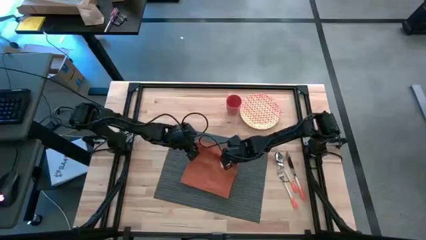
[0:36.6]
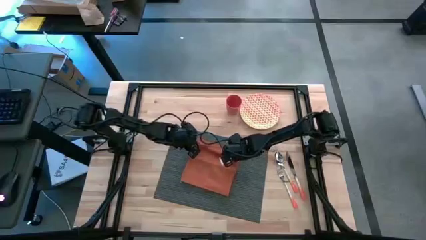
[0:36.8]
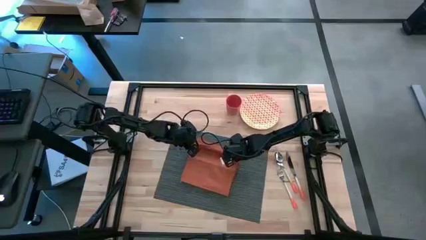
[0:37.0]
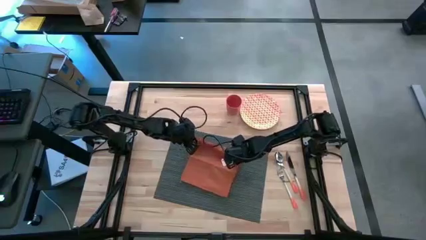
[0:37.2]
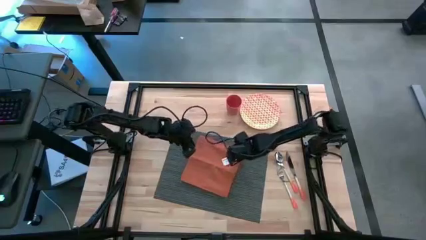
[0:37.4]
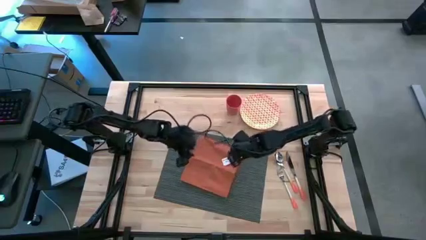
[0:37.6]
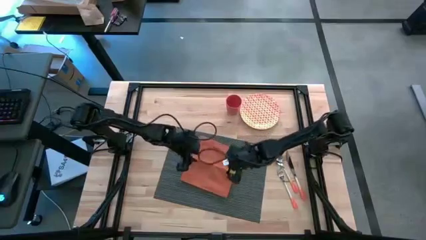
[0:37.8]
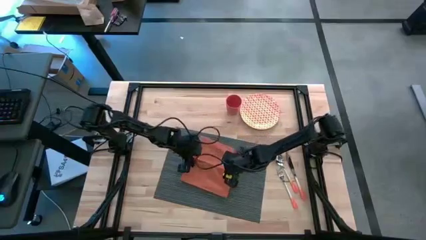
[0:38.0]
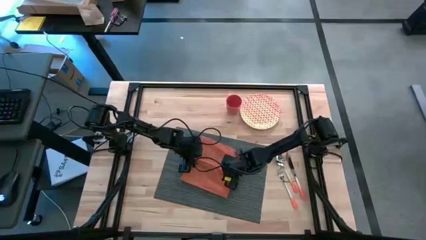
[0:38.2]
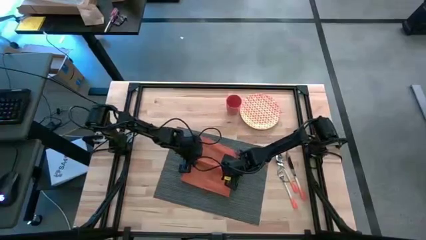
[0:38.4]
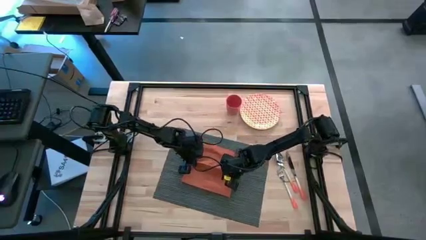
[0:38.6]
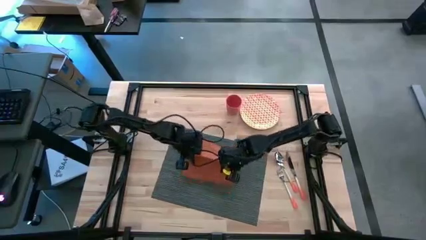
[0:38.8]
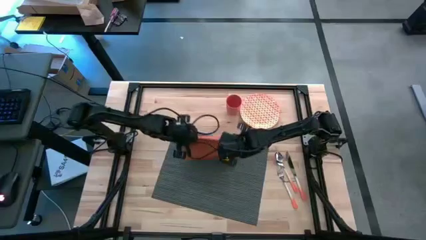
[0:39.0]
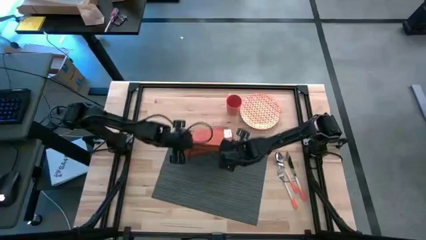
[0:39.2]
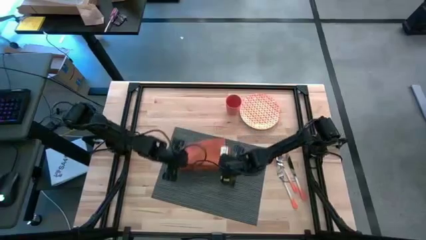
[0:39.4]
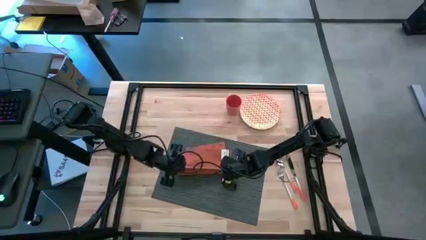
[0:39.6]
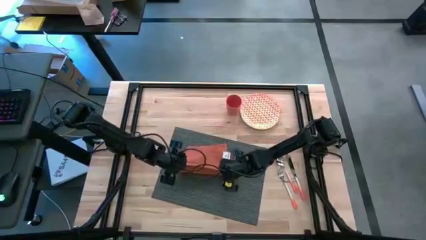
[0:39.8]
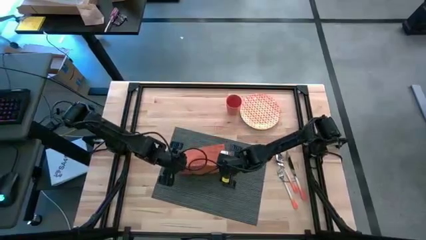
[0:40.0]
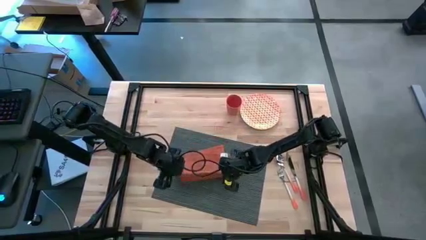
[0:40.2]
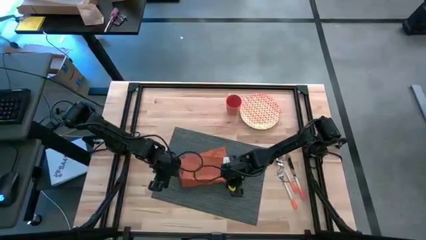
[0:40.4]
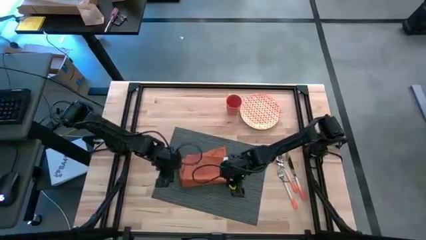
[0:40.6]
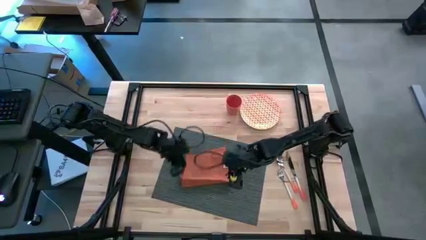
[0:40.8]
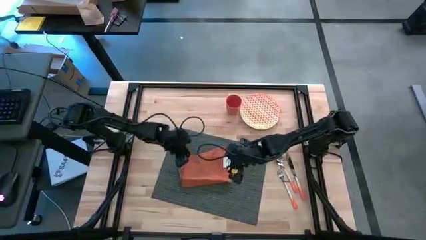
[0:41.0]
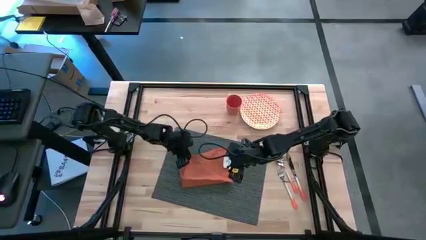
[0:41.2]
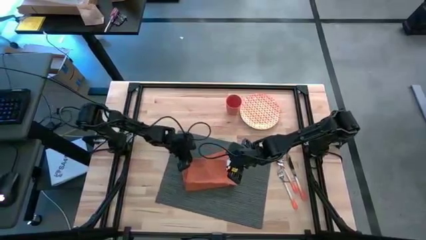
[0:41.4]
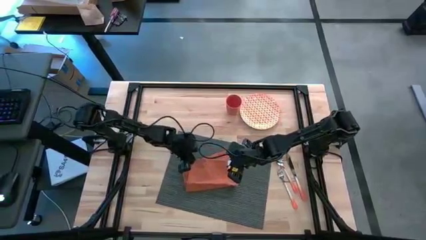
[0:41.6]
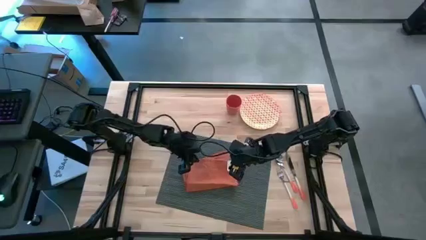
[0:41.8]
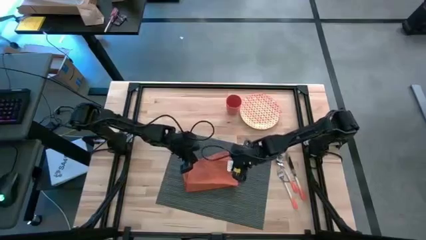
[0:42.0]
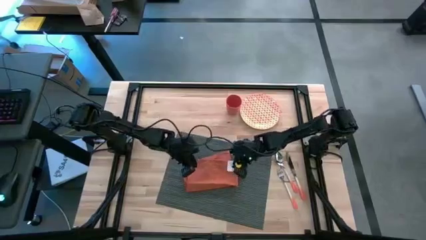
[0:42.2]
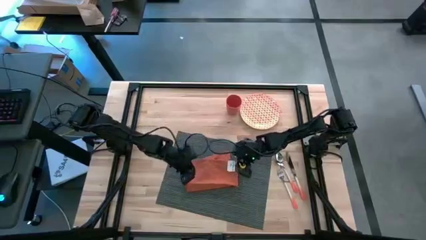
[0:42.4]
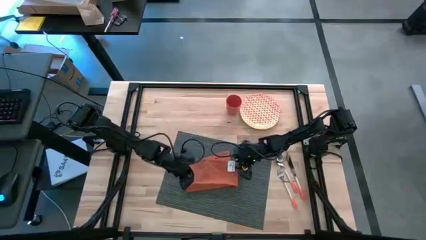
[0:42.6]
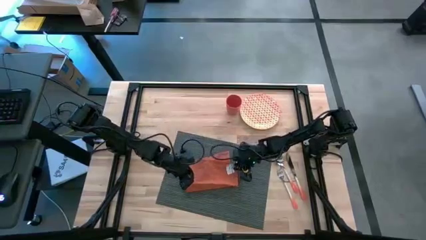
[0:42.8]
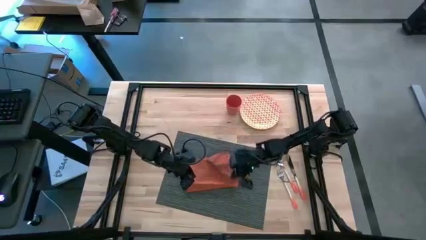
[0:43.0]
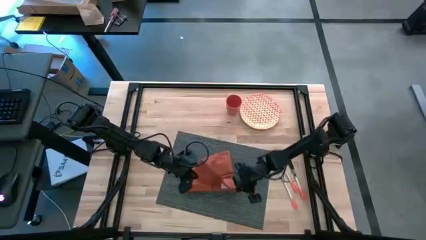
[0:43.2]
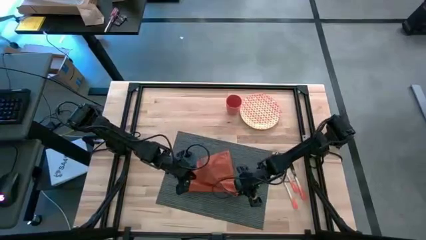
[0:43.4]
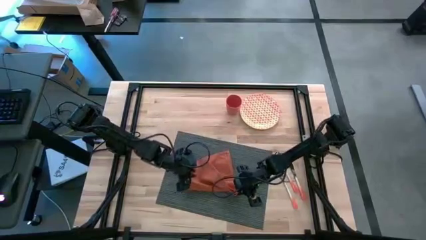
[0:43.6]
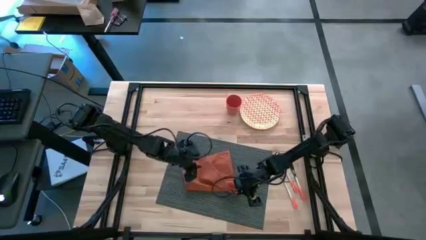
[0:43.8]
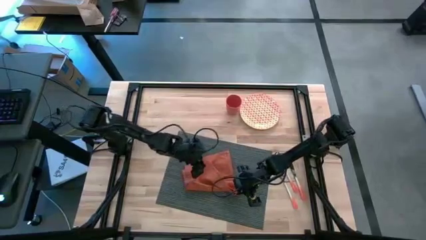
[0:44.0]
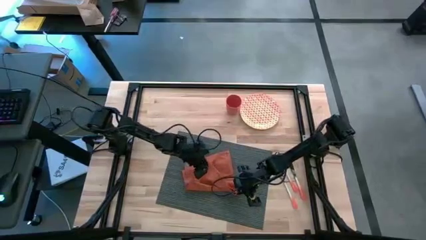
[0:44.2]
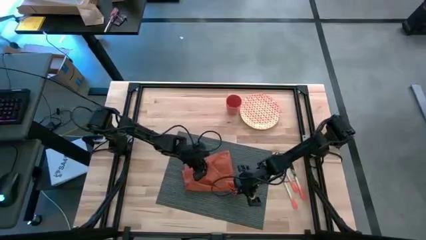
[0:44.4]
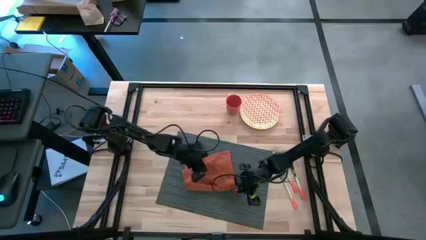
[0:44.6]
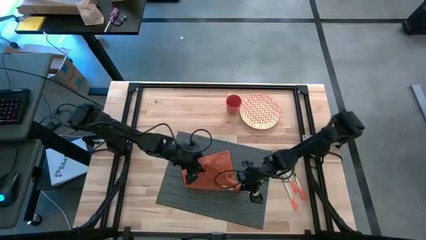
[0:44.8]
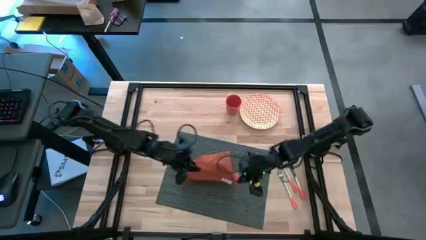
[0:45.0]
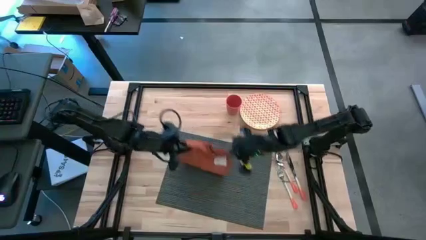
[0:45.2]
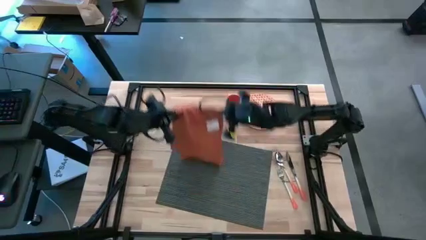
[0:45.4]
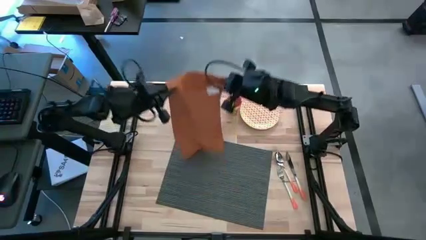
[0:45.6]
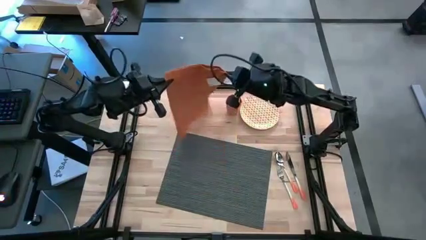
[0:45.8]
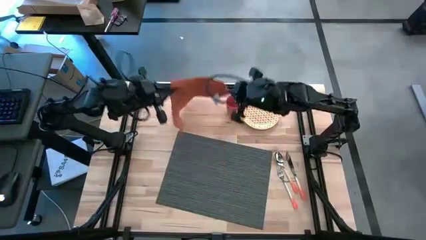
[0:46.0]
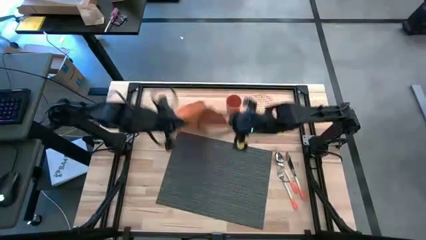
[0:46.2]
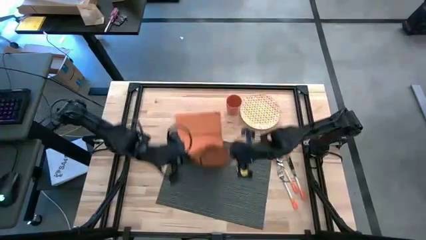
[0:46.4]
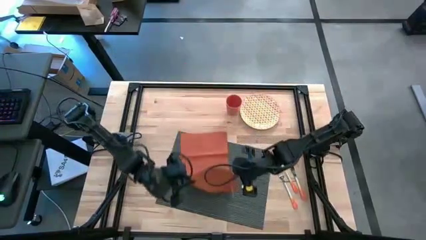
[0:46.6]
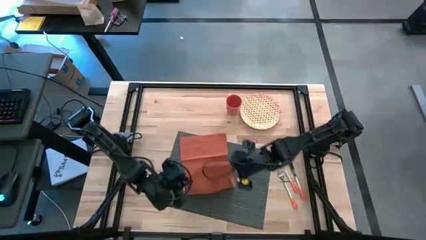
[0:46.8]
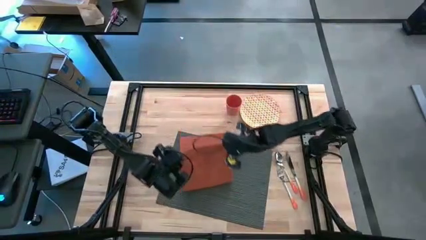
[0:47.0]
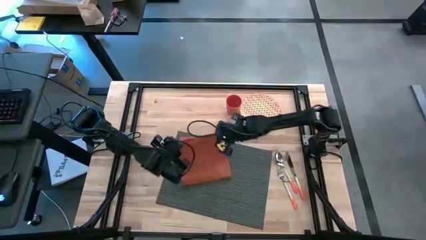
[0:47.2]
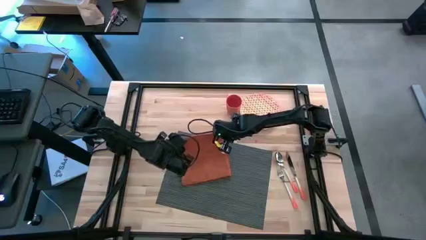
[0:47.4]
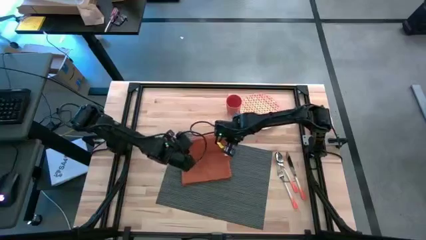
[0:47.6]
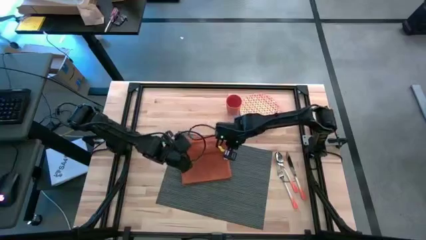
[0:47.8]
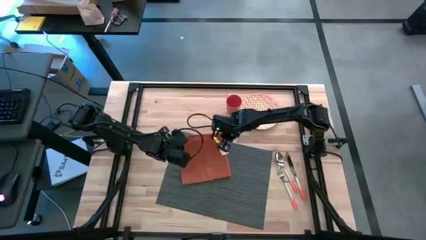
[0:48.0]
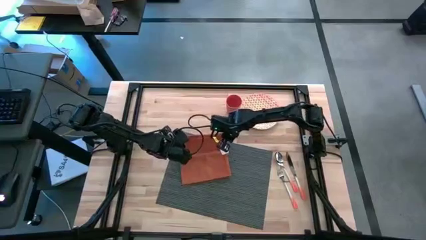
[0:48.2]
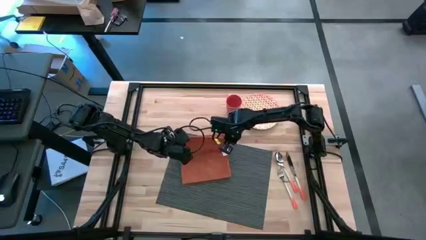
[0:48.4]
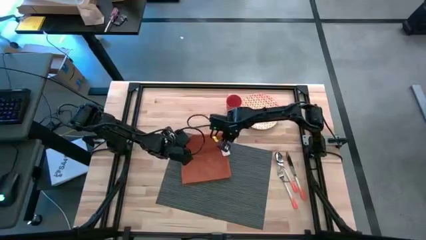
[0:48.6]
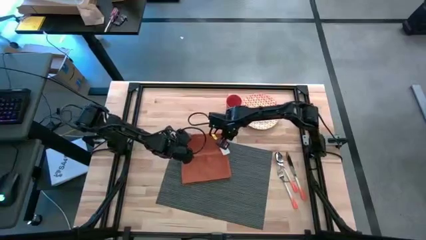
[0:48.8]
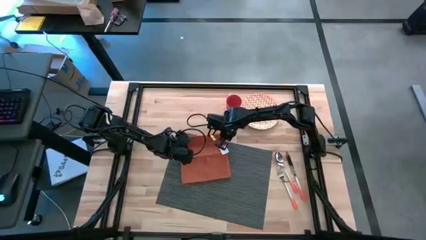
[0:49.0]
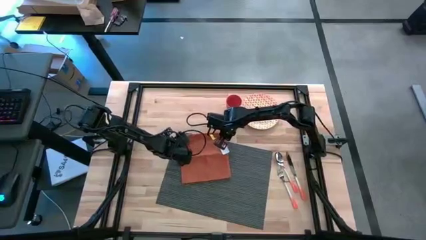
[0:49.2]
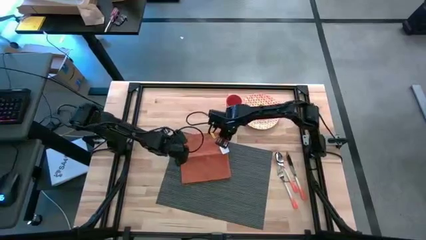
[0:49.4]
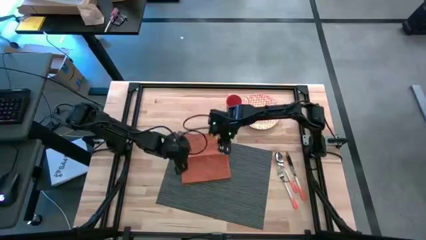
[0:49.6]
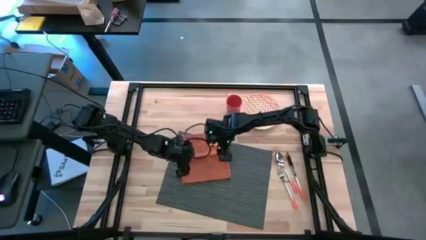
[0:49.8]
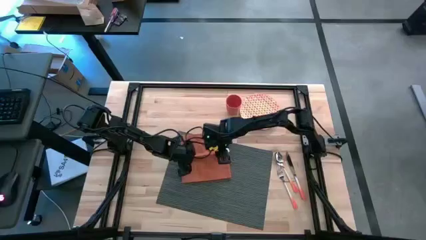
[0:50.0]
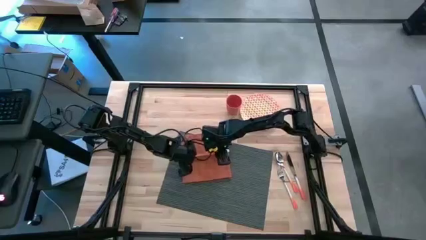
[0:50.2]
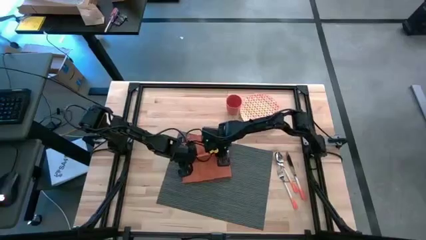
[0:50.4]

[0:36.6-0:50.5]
Task: Set table place
Fold the orange table napkin

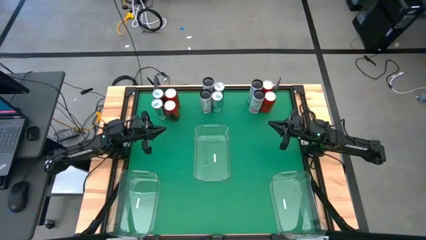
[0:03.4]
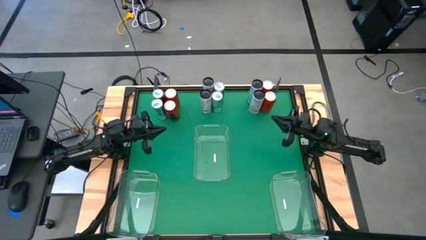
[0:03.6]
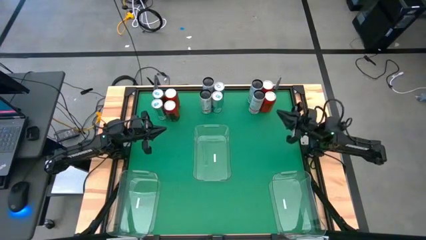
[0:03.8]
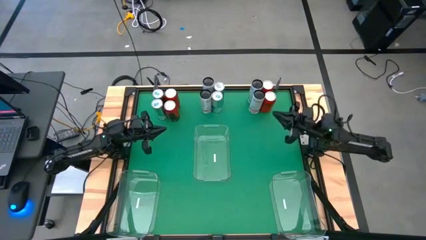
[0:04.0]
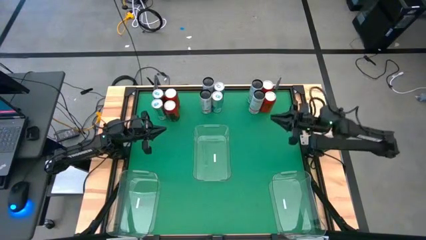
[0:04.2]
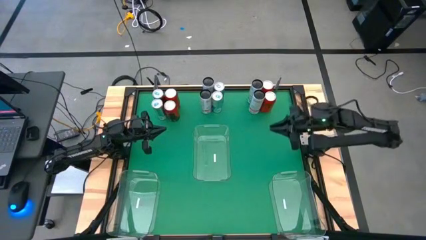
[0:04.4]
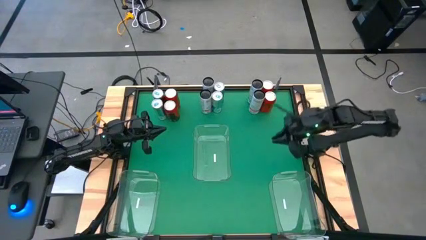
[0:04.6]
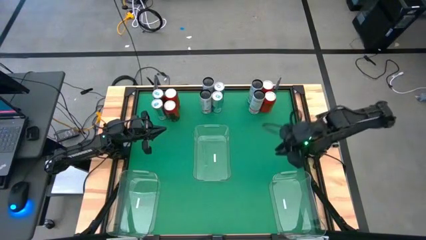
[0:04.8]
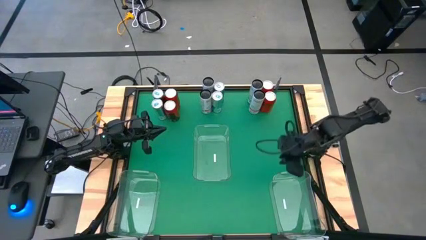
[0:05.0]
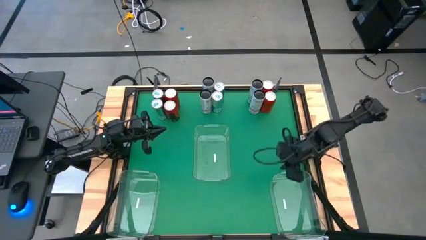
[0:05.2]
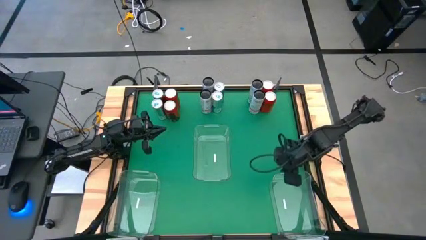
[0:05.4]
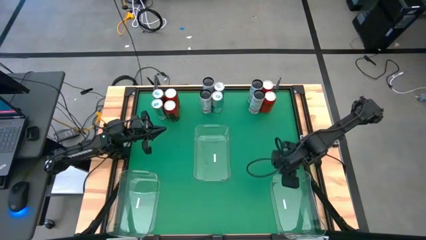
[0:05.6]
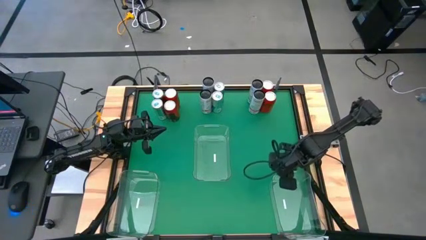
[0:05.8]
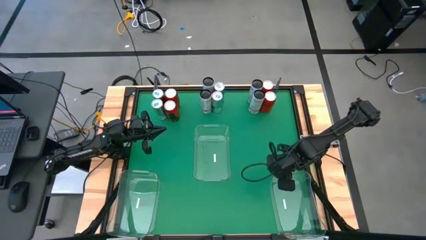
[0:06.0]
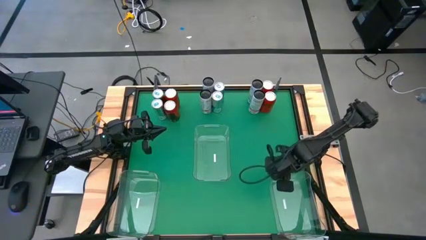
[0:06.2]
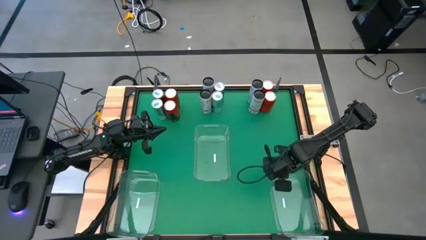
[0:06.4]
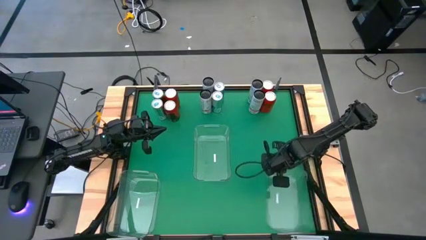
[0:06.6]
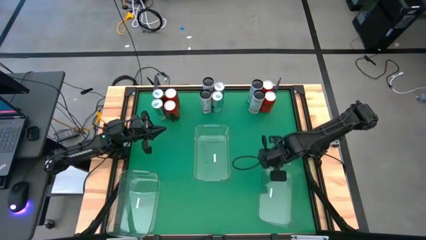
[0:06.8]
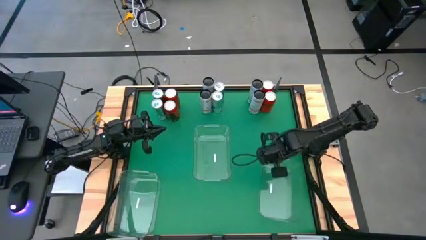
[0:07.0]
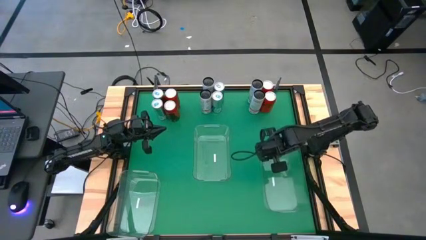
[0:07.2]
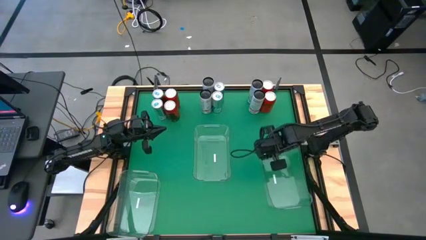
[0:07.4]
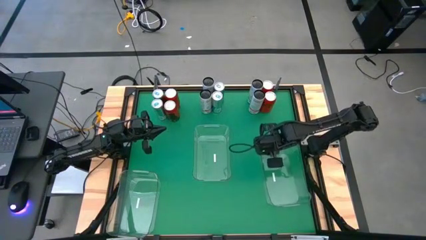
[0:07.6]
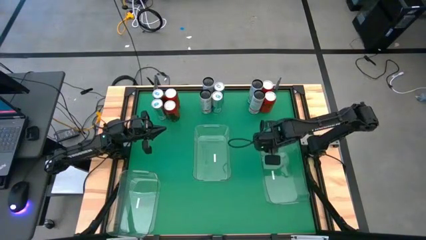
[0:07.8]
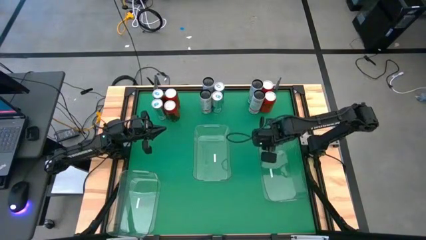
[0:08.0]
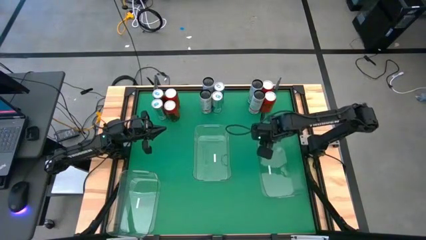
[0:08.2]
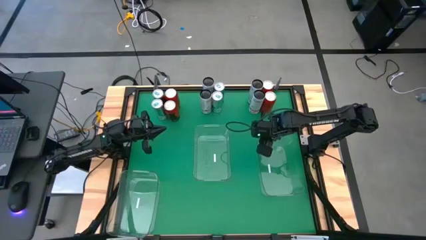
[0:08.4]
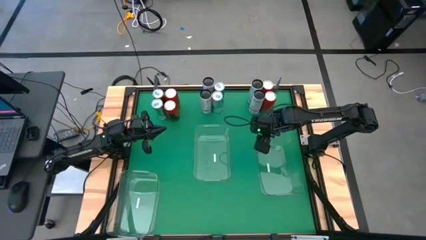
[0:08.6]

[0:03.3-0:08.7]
Task: Sort soda cans
Move the bottom right transparent bin to the middle right of the table
